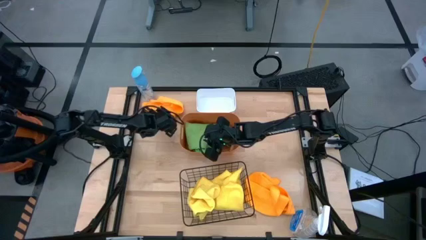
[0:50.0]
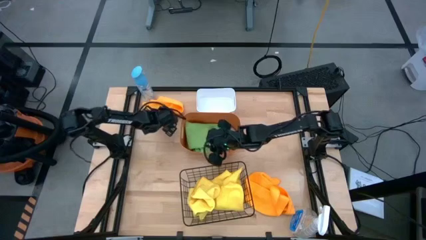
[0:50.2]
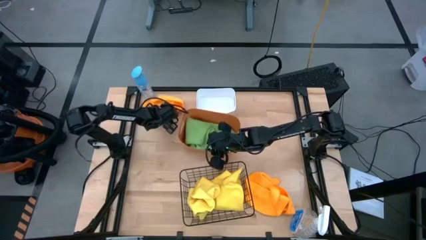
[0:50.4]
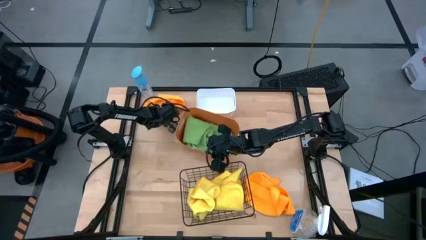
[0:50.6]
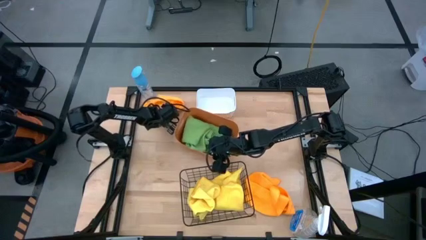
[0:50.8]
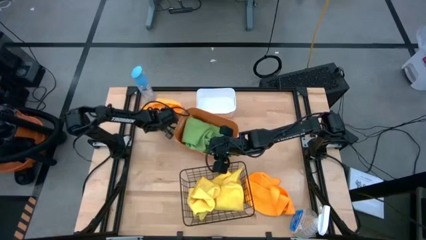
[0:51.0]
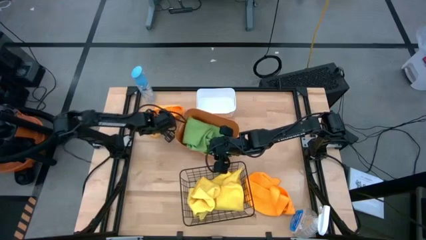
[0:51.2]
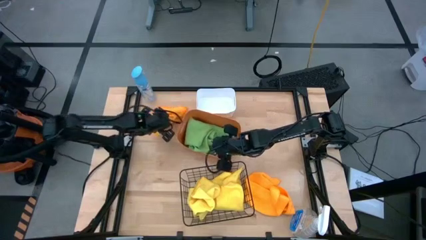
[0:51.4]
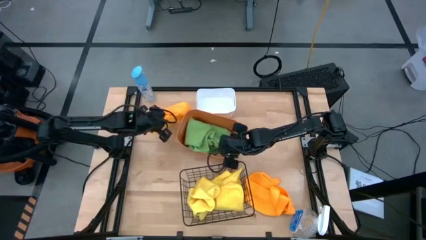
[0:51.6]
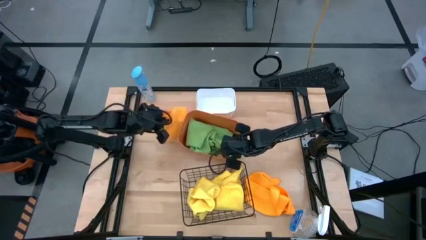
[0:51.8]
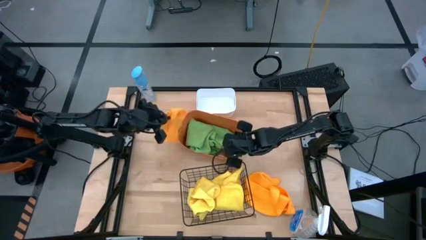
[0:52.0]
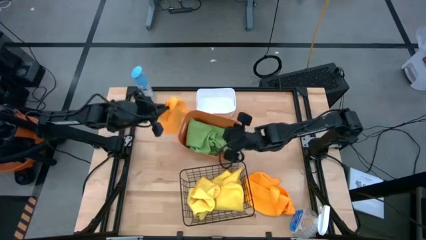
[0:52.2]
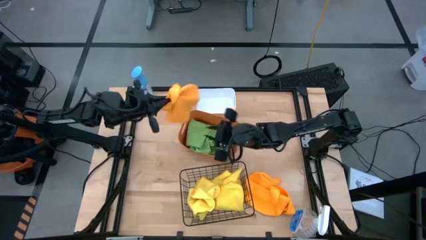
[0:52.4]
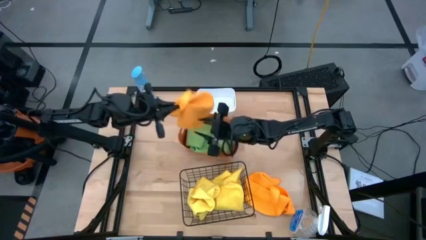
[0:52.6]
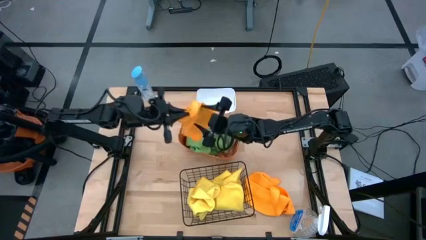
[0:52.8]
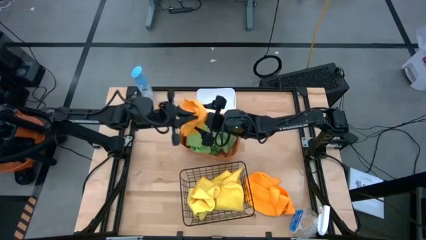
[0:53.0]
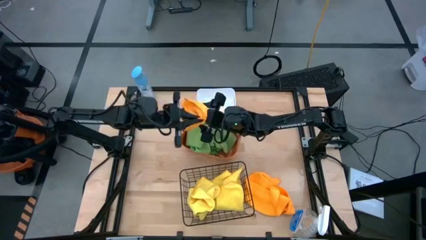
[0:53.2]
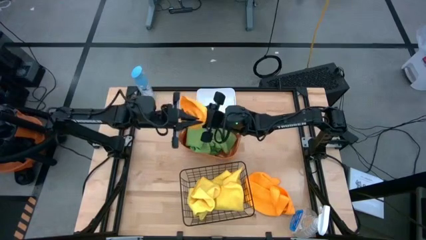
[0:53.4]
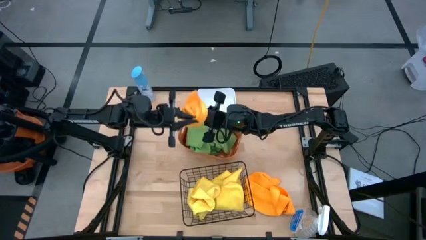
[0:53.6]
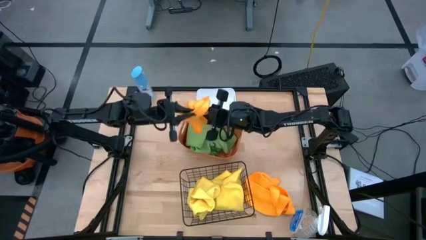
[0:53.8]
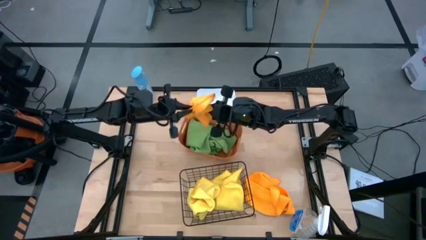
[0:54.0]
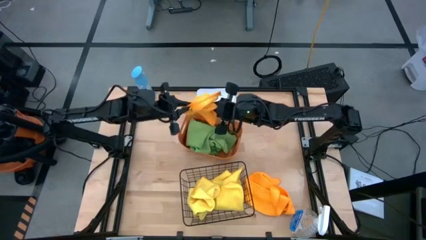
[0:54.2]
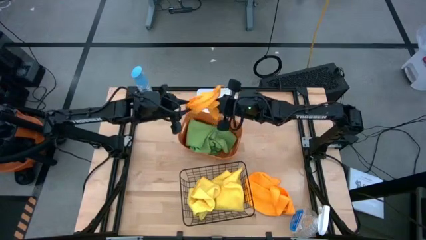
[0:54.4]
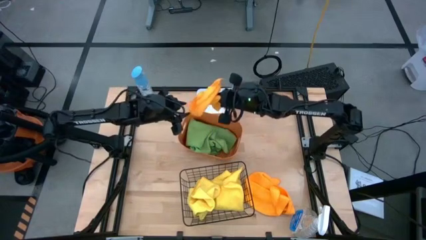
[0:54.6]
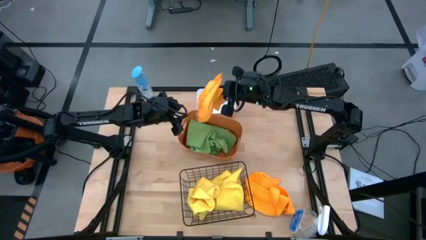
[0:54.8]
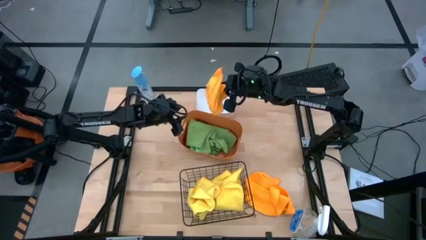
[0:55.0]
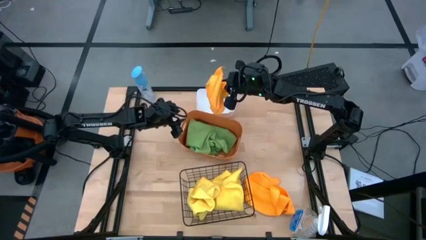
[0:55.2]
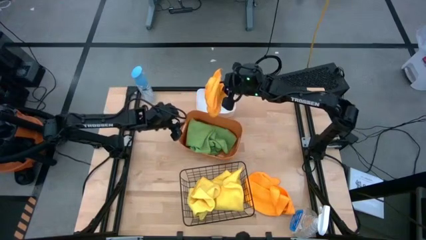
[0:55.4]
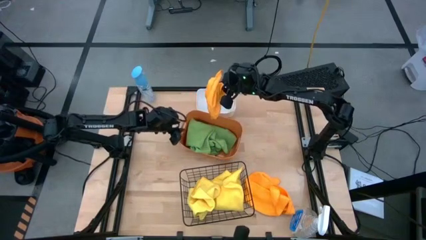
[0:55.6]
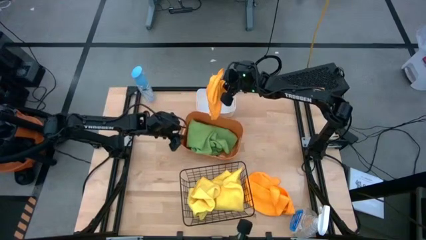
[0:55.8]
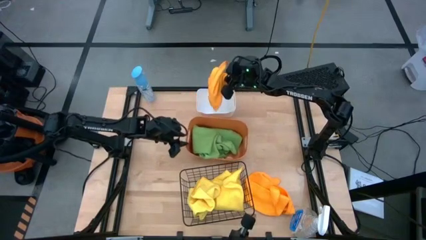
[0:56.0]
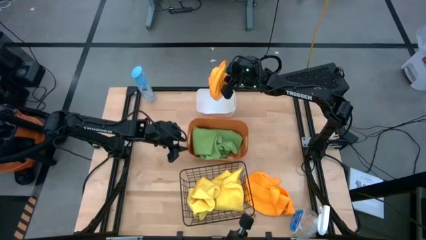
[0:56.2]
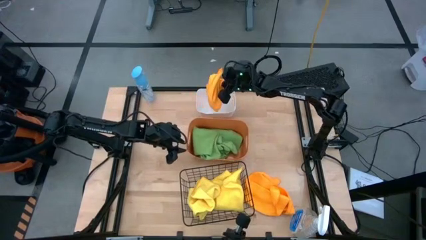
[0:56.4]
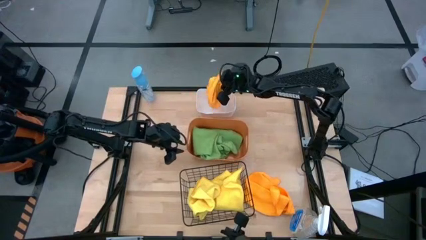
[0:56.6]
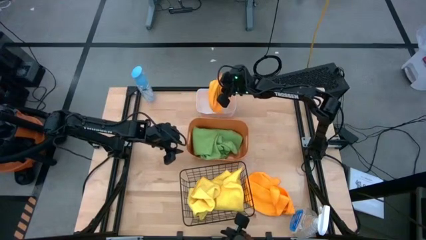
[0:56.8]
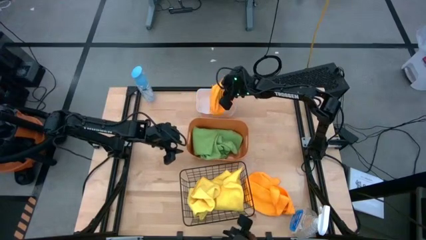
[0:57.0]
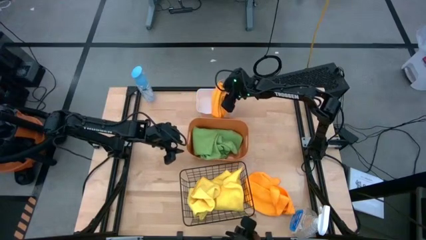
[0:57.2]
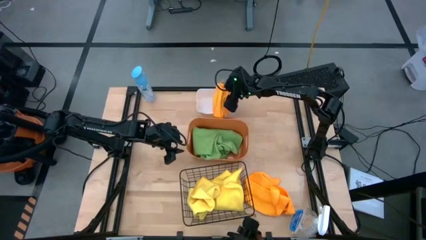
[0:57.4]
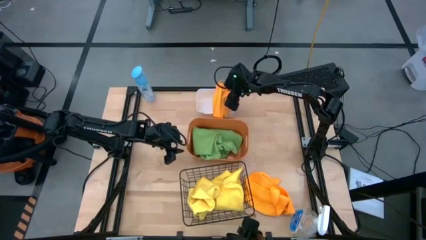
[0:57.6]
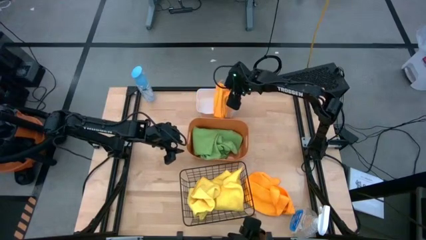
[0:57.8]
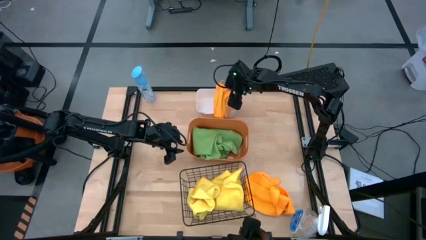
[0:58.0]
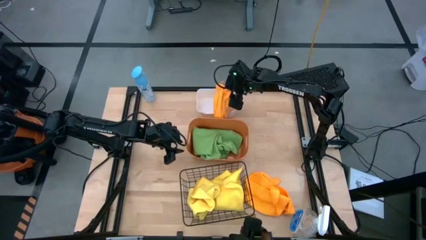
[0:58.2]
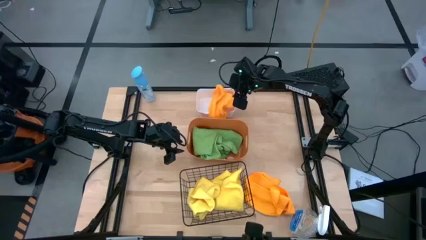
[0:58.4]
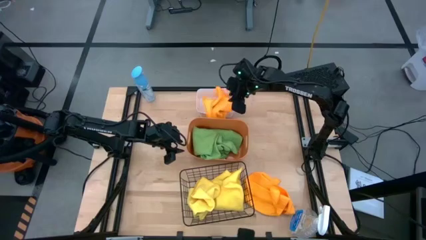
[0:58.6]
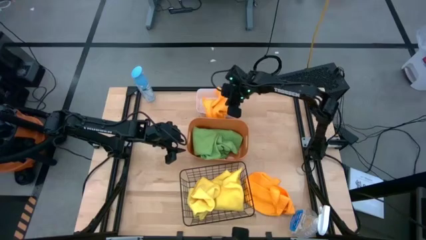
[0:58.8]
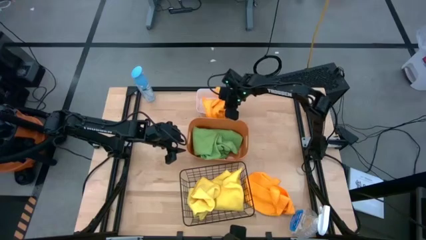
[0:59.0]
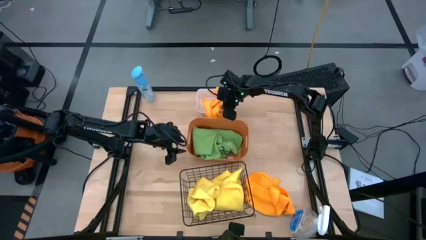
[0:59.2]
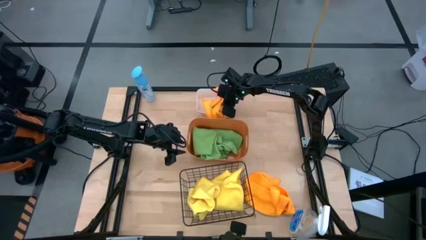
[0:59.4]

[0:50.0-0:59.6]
Task: Sort microfiber towel by color & place in baskets
Put the top orange microfiber cloth into the white bin
